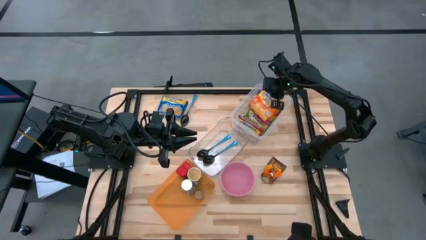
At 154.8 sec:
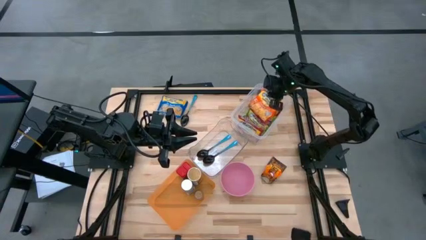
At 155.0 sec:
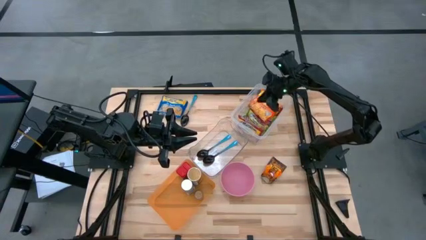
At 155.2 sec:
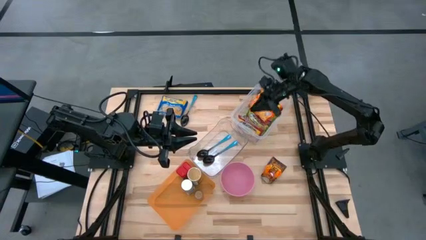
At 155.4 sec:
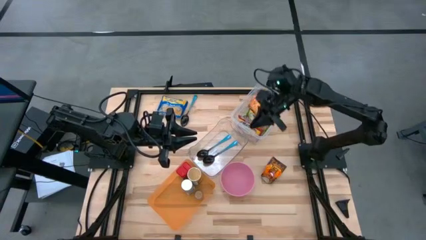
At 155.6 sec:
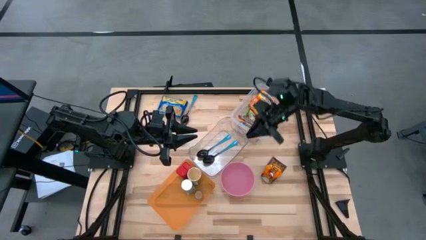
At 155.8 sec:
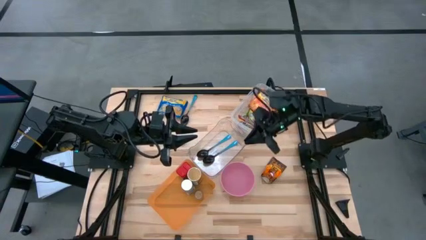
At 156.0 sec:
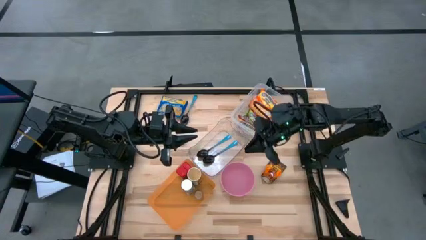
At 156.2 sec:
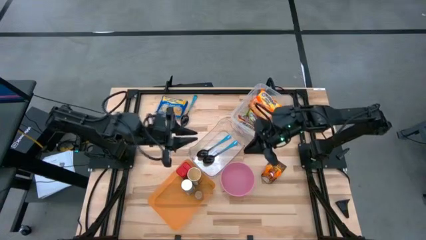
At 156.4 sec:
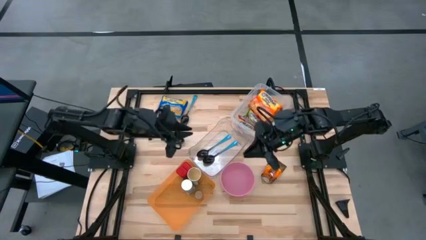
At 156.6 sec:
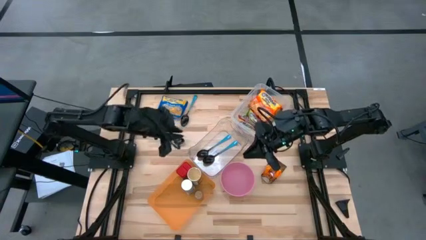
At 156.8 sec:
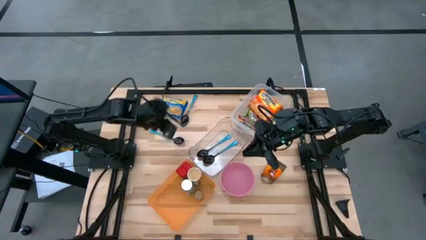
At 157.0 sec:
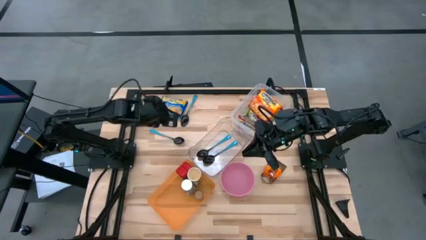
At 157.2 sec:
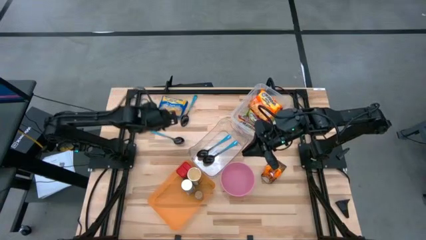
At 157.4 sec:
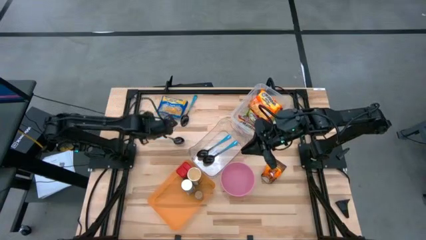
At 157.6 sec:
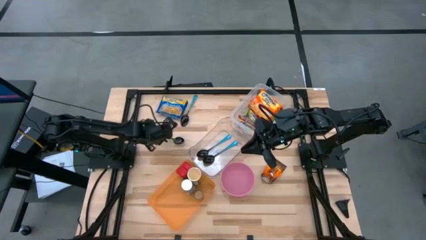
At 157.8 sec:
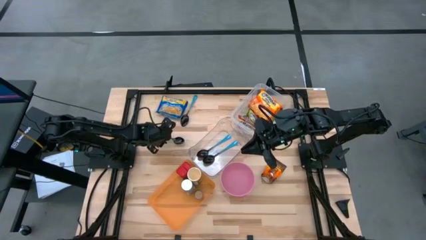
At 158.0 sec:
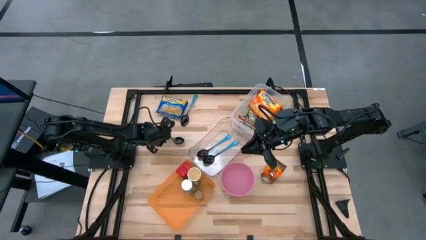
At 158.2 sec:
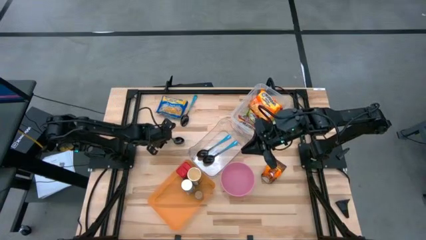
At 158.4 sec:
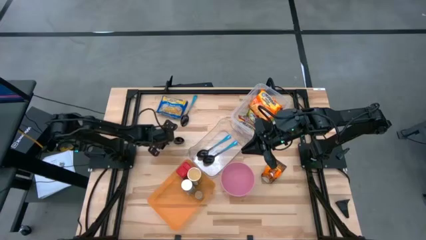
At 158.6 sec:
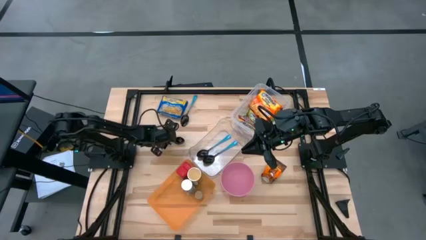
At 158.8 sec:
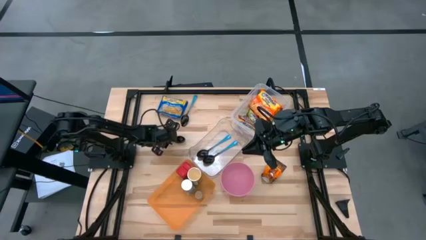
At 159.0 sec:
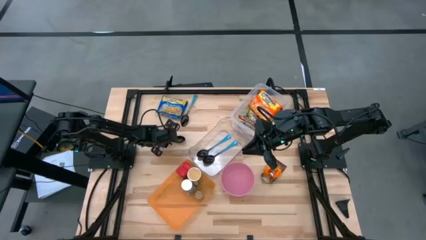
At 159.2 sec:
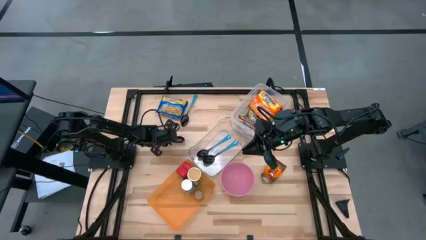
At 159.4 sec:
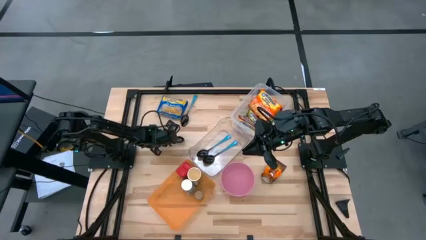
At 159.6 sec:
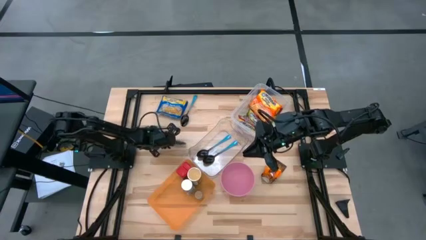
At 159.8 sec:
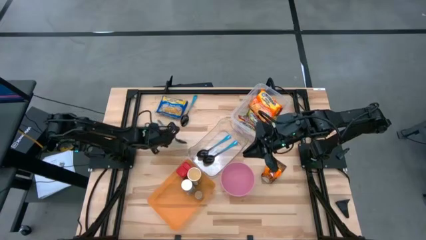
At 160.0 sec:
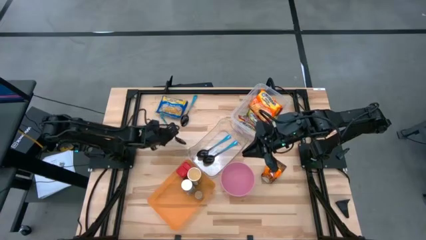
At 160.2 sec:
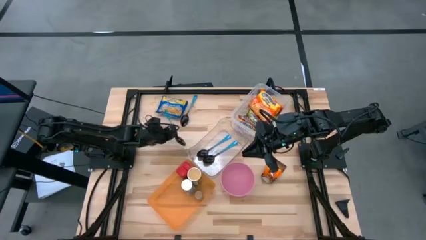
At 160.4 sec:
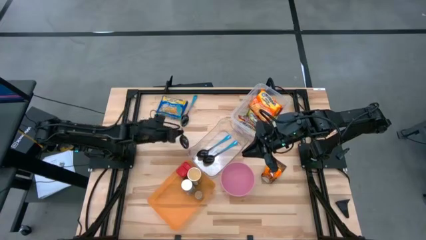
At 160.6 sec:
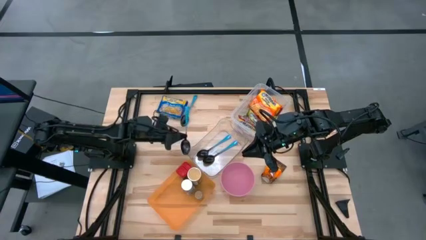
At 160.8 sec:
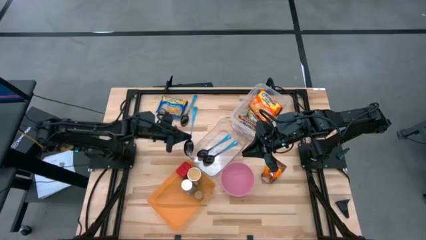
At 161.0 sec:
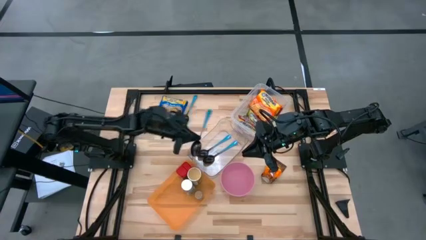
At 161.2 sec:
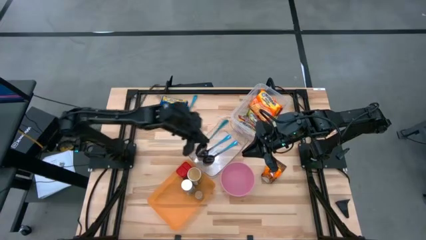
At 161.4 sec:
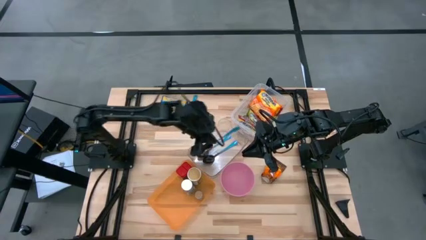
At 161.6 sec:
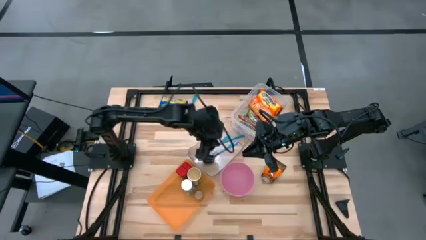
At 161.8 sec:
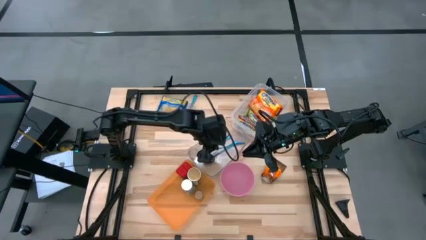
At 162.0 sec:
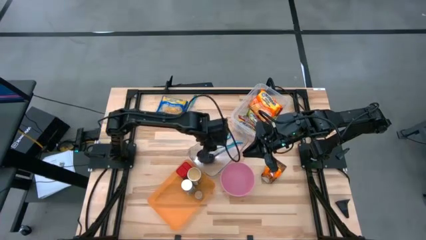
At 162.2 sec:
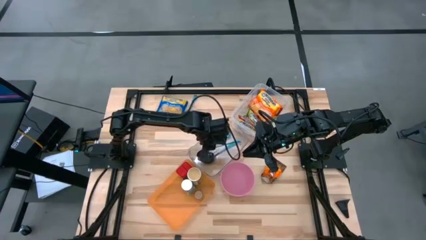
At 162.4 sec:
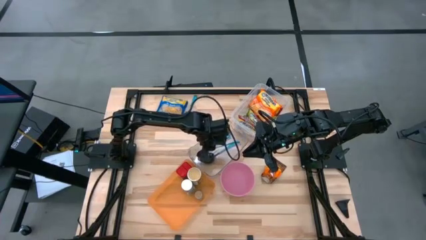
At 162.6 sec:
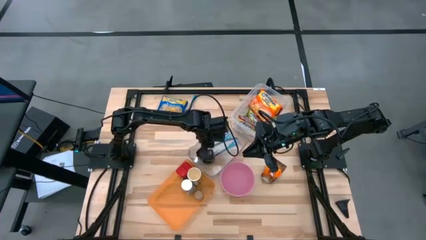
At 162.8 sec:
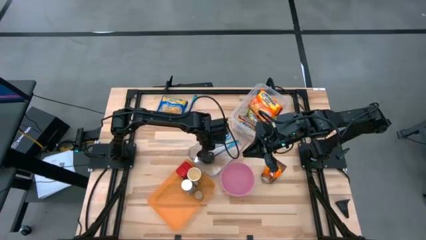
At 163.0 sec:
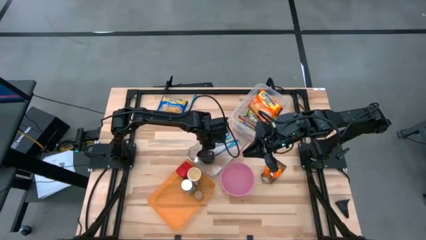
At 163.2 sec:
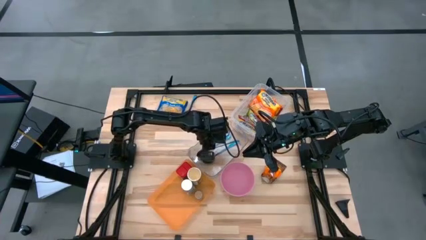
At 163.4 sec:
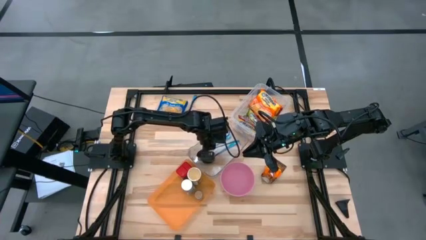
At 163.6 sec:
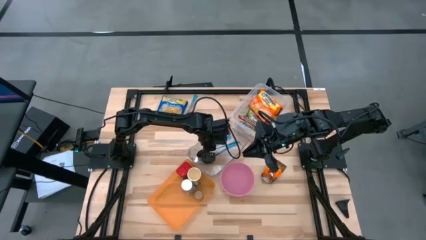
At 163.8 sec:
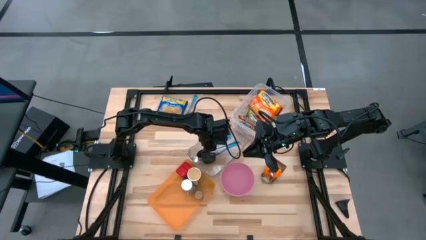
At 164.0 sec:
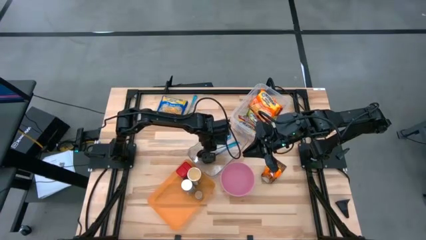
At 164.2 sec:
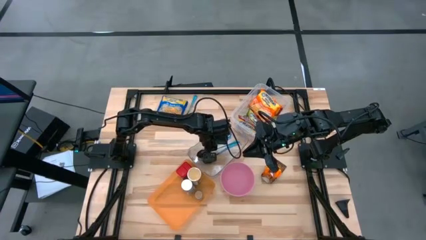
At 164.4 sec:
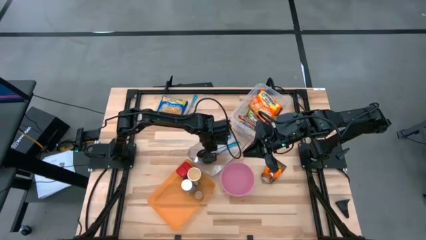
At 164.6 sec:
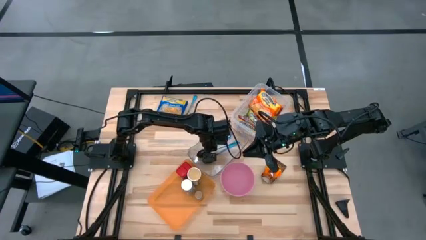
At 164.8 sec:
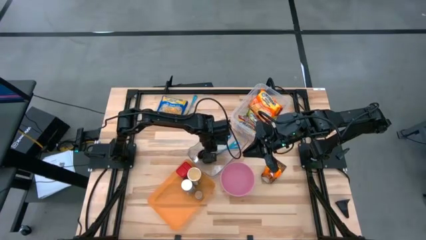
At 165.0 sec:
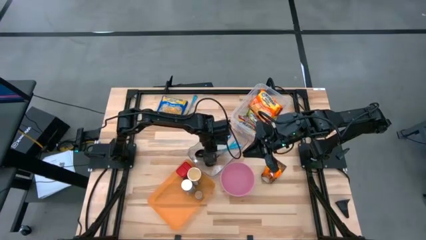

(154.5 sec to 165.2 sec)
Task: Pick & Place Food Item
Put the blue spoon into the transparent bin
